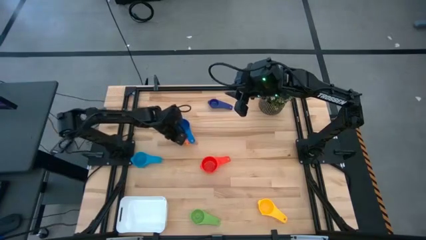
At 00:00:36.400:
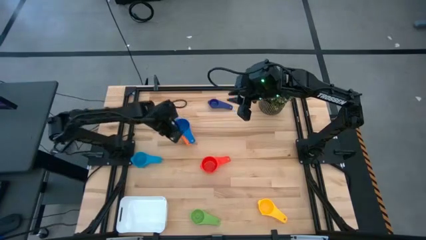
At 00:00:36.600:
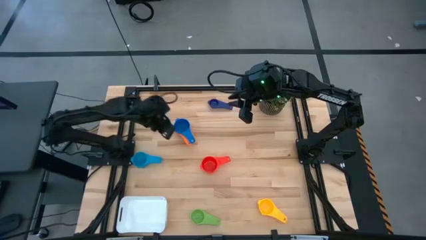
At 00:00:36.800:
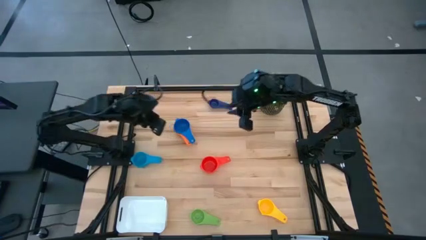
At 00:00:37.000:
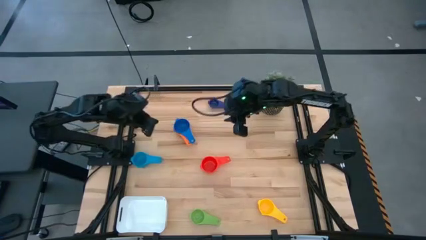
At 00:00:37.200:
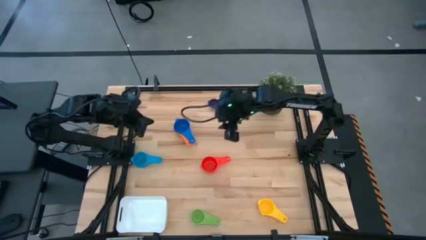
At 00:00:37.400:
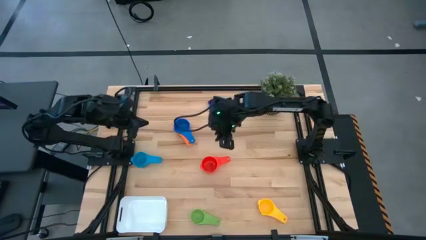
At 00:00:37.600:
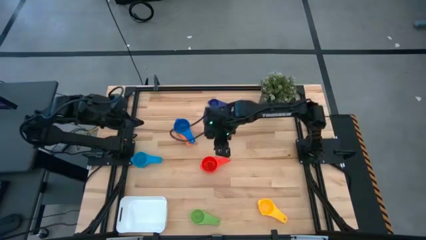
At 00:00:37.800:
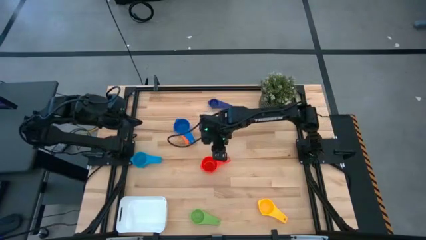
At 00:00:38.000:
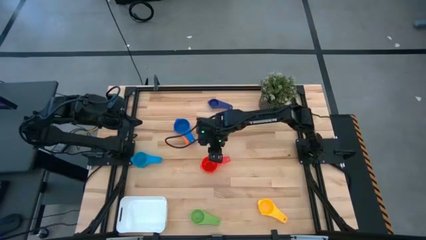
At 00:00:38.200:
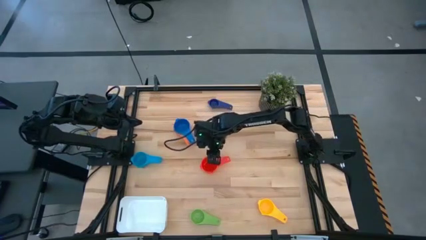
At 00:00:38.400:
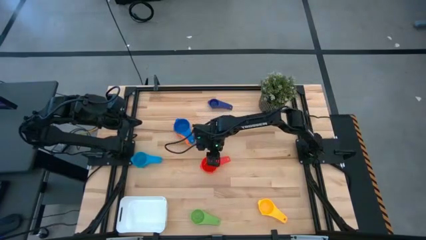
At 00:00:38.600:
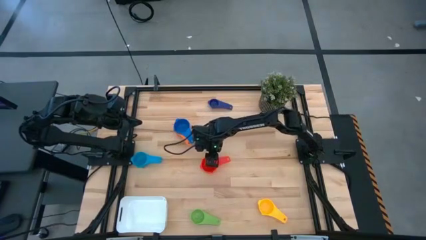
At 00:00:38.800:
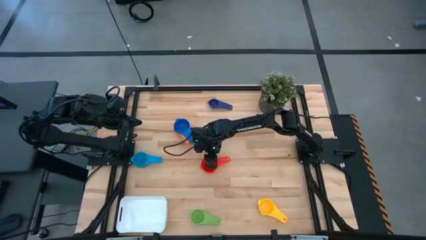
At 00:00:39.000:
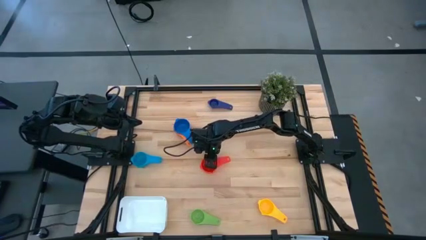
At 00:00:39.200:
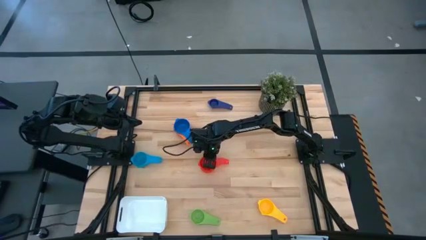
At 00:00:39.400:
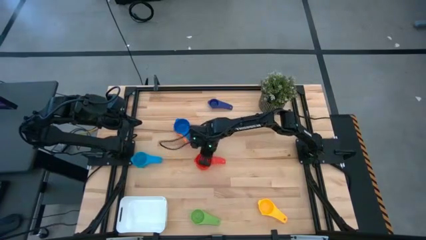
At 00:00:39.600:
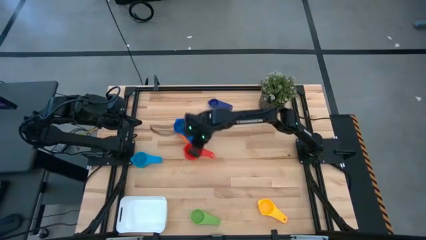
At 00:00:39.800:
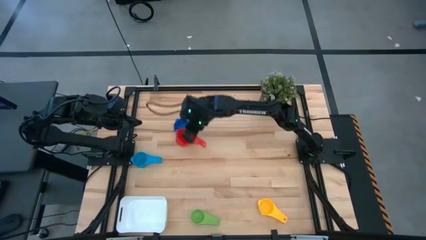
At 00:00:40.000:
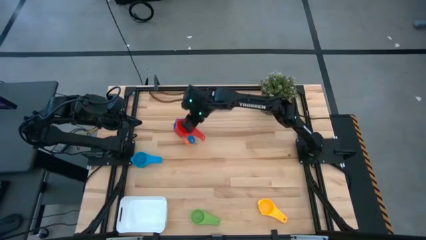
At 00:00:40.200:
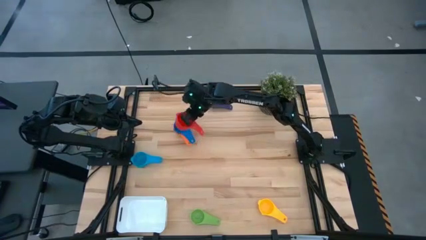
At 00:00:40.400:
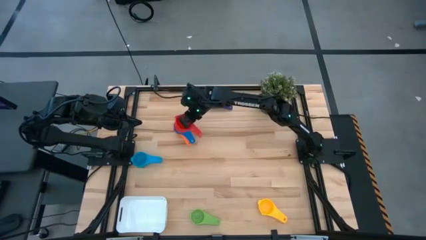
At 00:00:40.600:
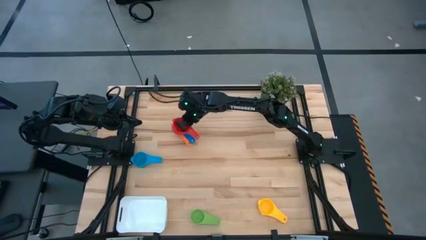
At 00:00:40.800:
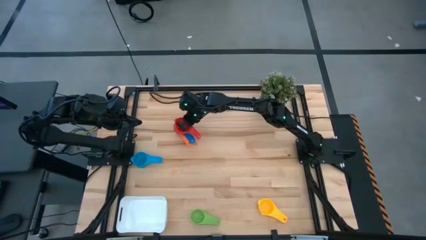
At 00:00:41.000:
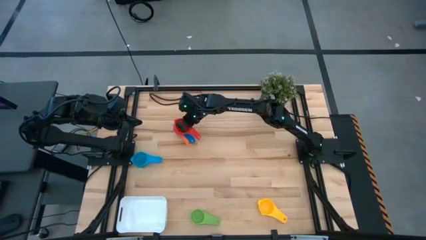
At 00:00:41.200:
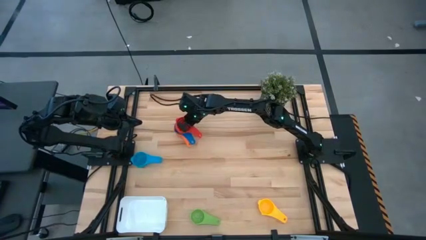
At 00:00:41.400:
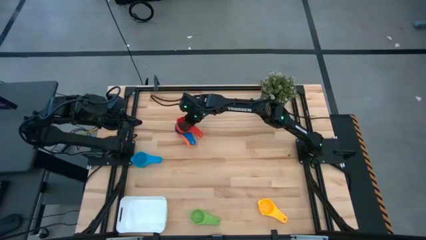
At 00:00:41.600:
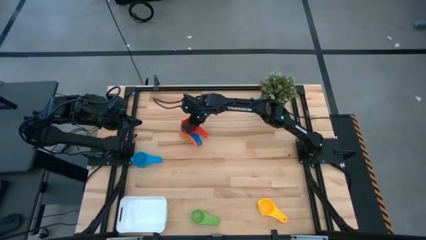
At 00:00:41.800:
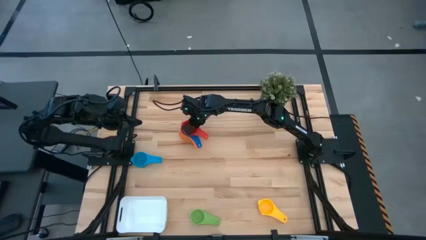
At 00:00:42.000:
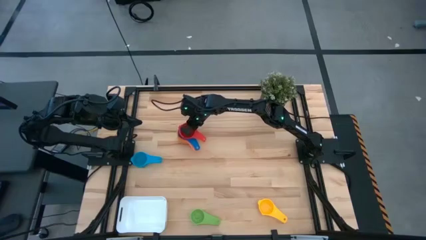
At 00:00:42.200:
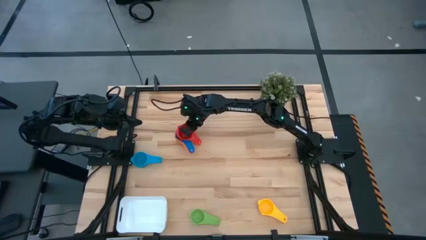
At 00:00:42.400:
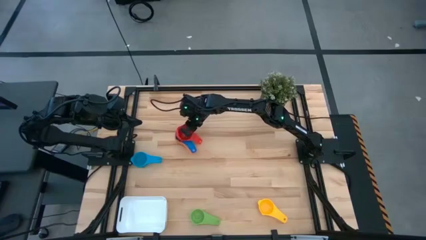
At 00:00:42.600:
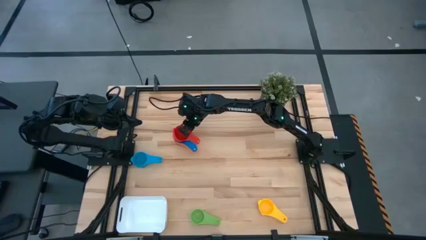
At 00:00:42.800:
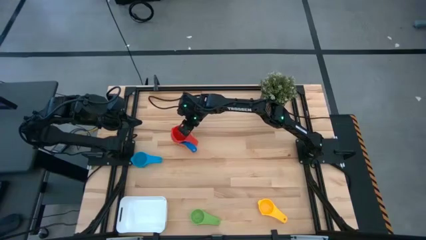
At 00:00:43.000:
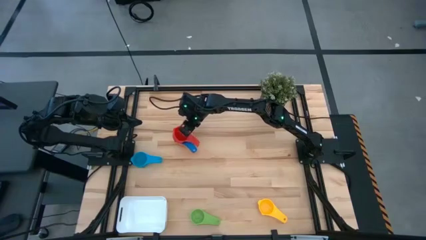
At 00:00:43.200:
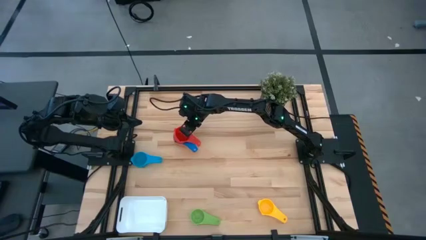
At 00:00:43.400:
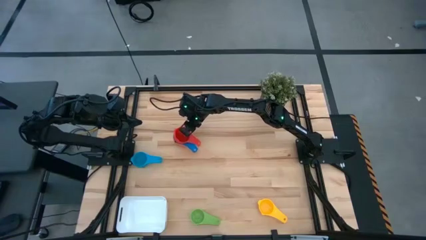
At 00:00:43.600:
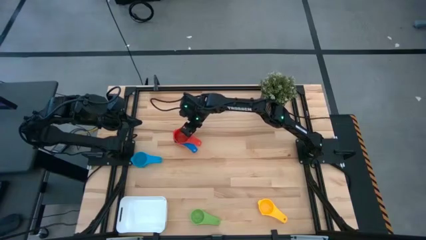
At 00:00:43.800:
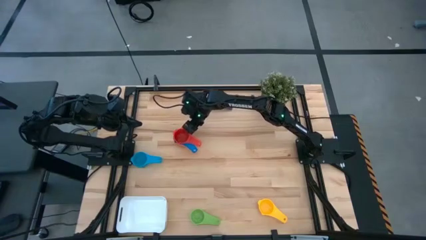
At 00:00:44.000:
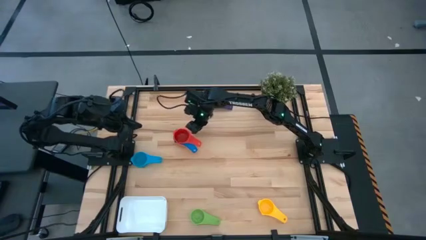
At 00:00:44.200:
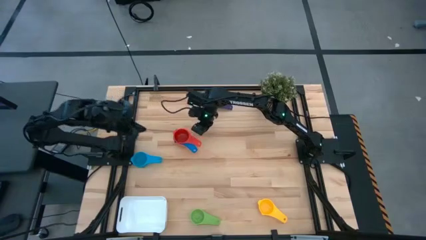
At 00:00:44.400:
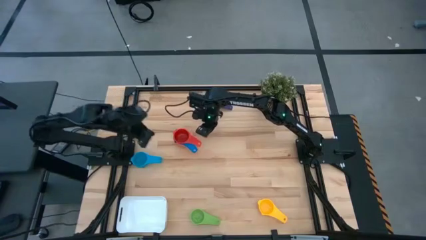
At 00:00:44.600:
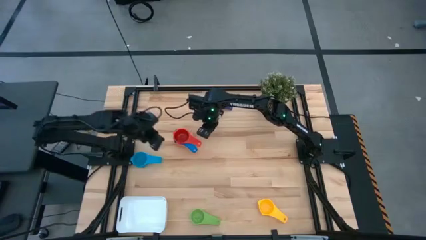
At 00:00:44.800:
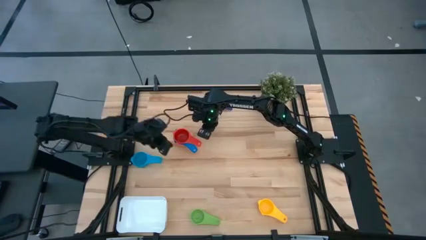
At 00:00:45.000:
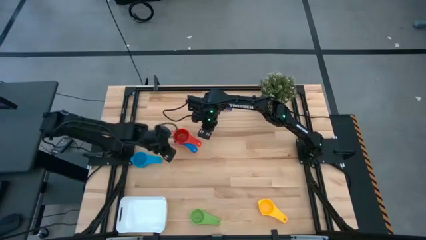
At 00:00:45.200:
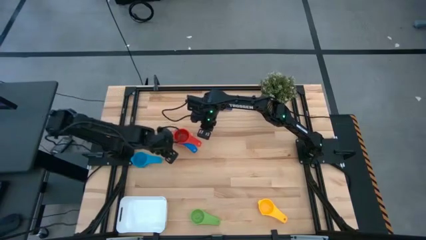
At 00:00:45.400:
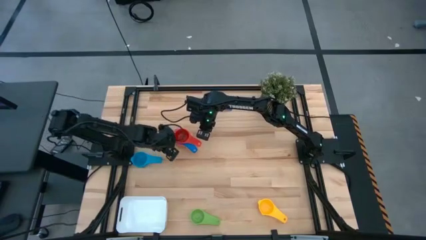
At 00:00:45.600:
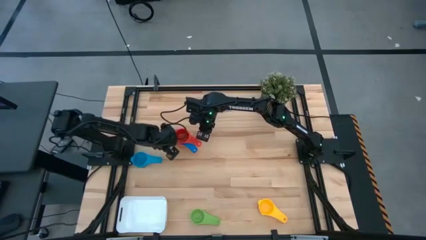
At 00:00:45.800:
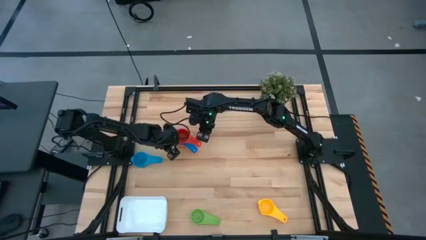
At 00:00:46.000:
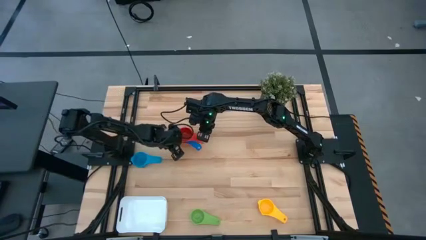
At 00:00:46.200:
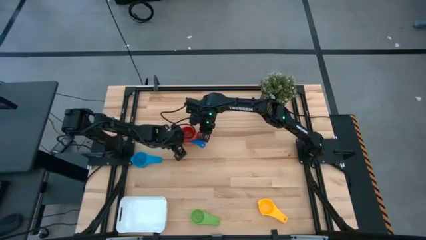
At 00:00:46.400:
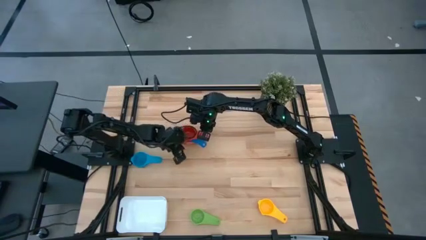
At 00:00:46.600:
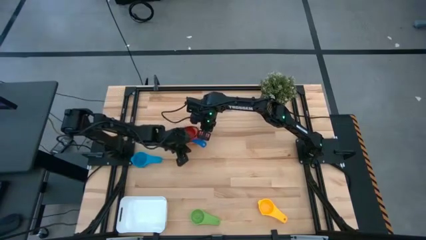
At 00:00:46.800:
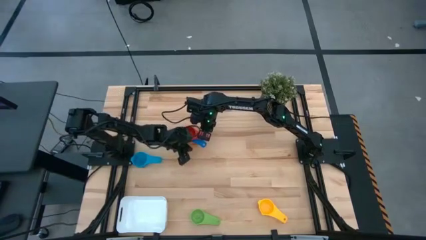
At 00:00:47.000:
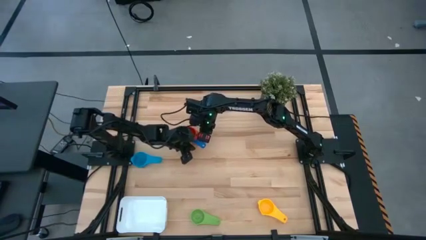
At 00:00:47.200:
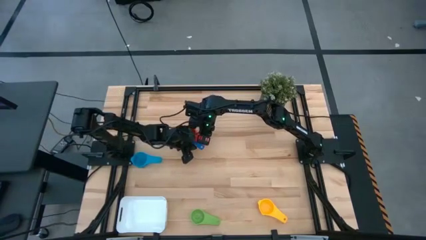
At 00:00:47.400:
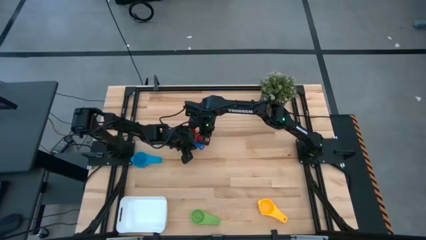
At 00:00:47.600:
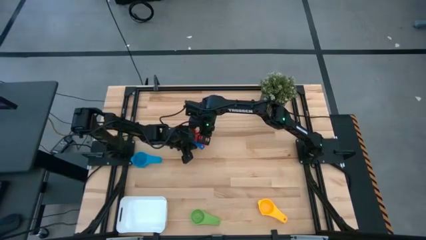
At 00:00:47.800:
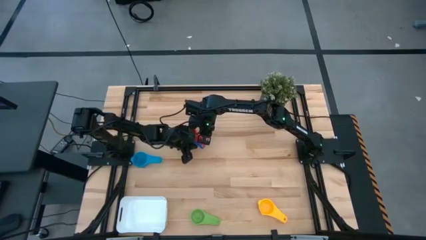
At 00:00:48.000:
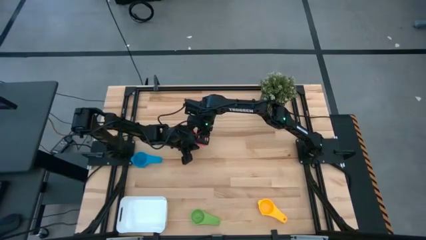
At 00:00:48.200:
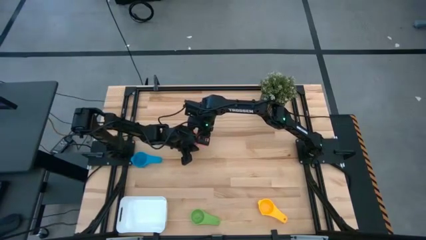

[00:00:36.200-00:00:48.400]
Task: Nest measuring cups in basket
Stack the red measuring cup into the blue measuring cup

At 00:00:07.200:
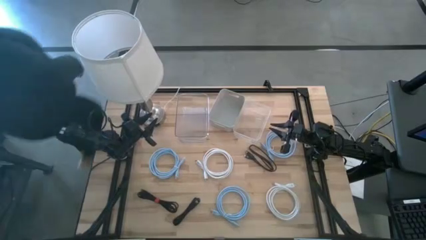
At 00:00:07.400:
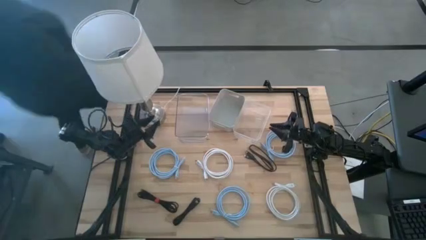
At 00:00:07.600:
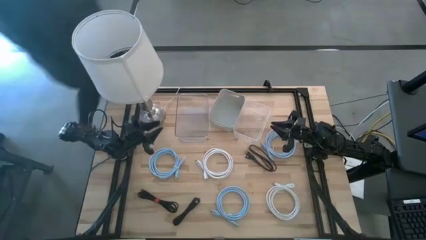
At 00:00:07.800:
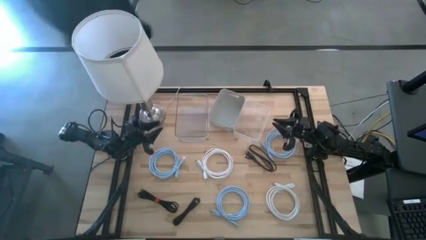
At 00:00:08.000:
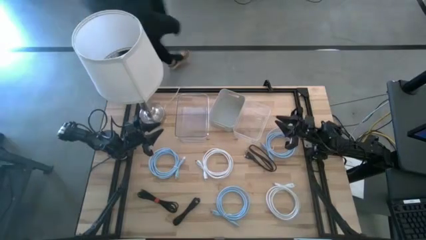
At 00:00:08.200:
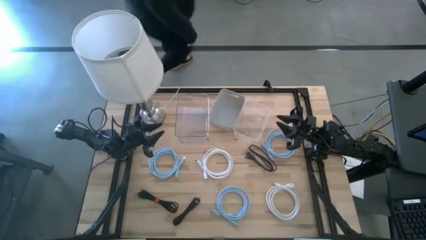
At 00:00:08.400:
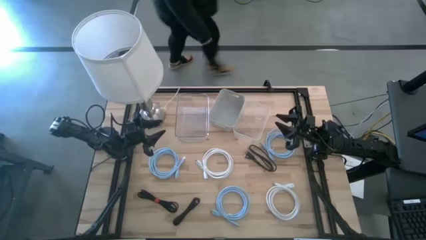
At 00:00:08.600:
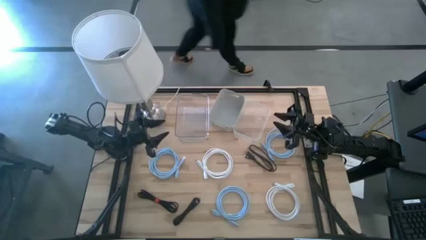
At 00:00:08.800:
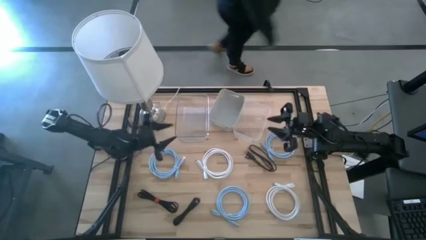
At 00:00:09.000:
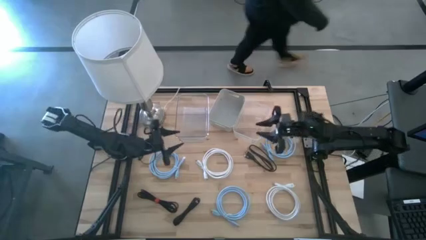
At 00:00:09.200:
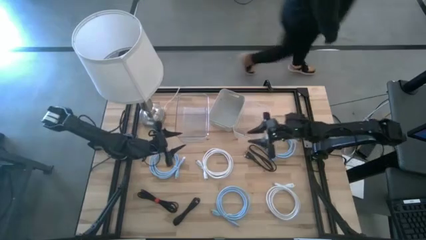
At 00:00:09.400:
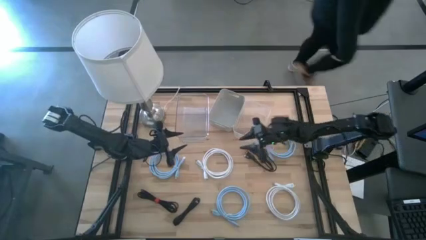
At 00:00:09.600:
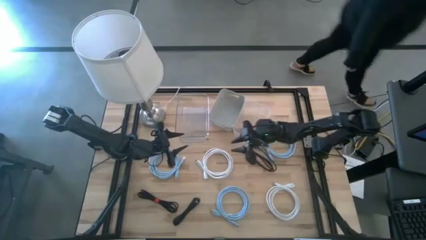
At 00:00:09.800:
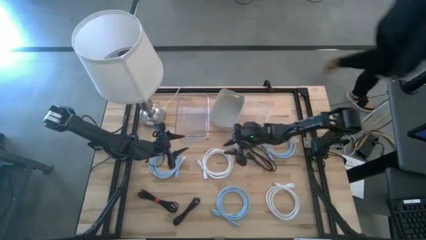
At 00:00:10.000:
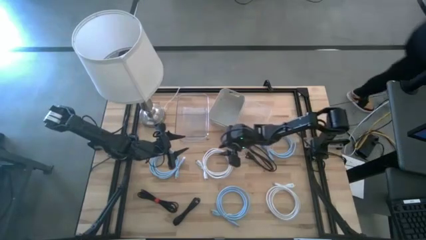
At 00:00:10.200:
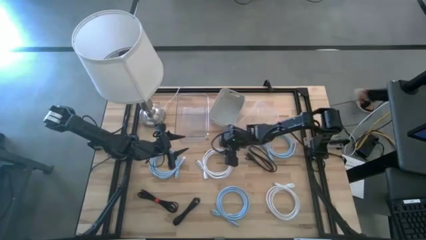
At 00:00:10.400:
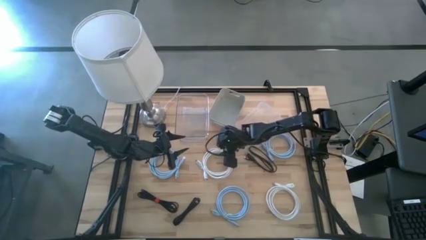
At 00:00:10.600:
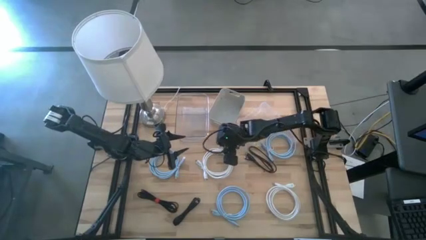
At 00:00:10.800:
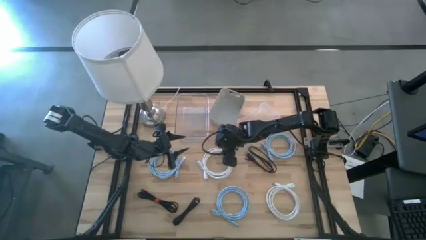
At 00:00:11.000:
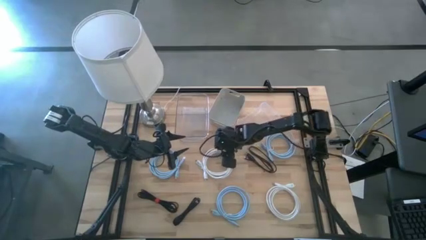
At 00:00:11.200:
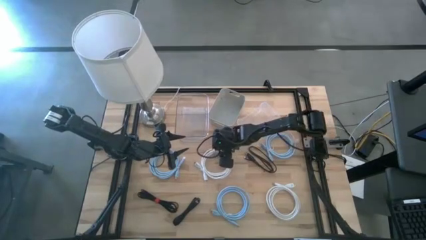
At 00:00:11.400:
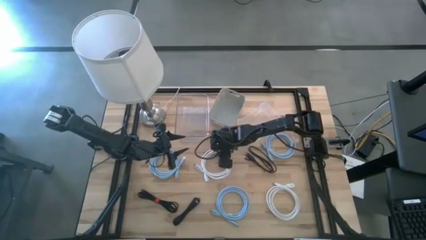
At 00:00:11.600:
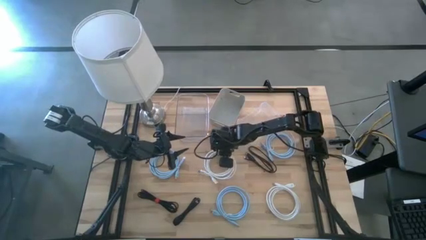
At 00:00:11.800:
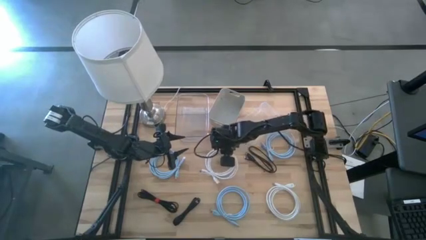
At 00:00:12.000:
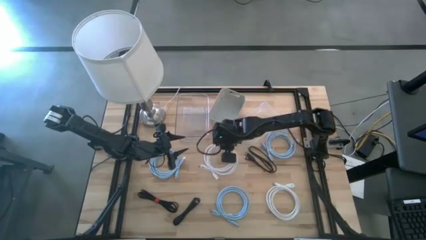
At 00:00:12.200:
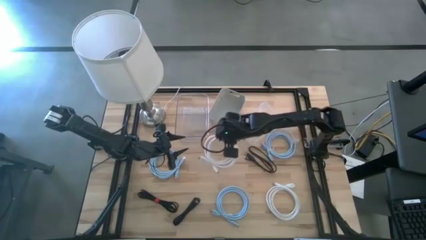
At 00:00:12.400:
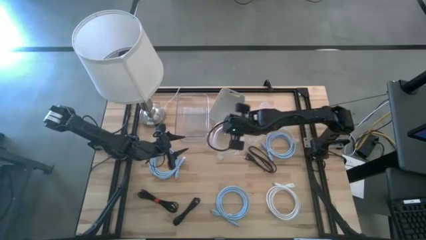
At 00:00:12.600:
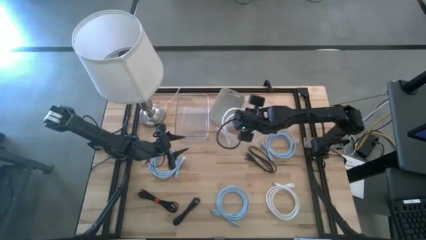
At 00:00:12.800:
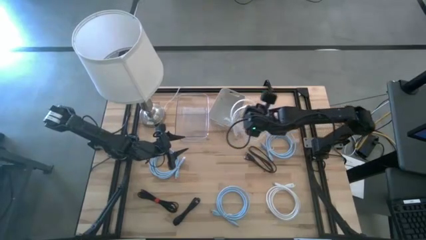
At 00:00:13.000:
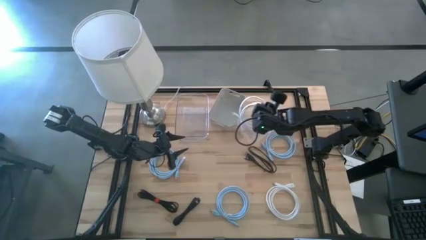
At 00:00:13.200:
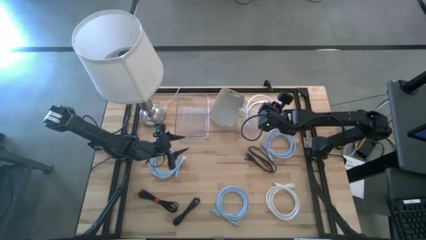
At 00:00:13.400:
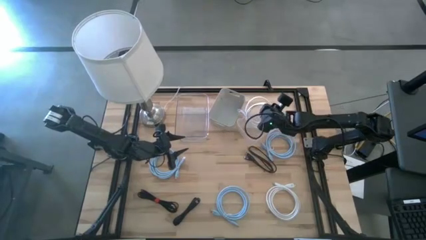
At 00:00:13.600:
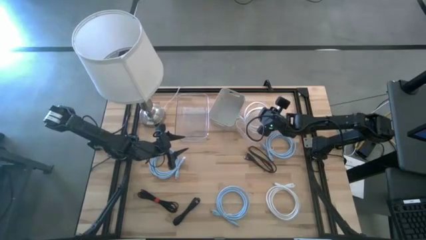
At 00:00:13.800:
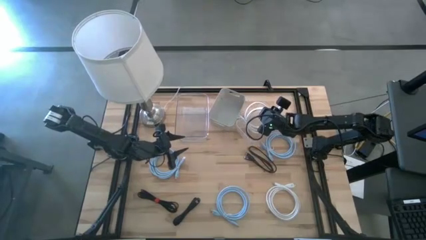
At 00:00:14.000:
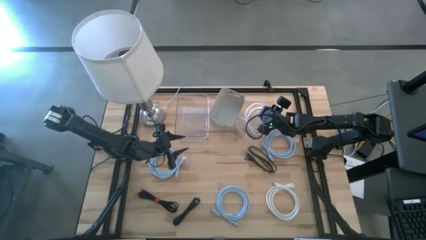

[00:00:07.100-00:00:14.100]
Task: Sort HDMI cables
Put the top white HDMI cable into the right transparent bin
